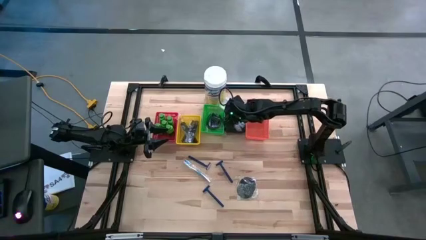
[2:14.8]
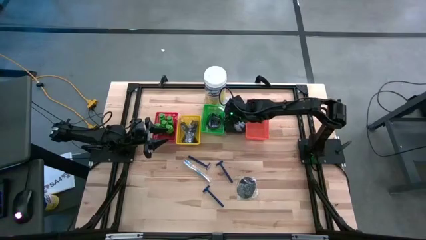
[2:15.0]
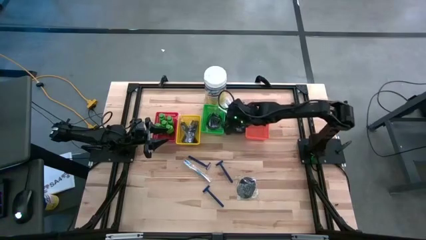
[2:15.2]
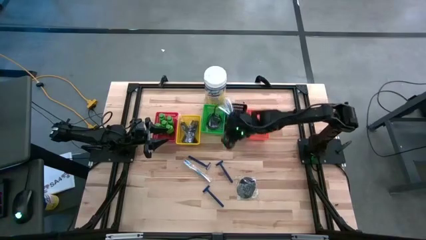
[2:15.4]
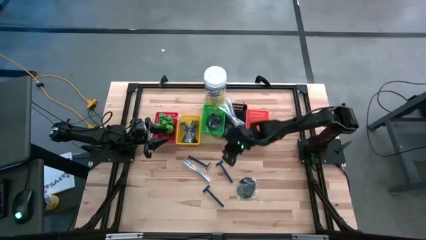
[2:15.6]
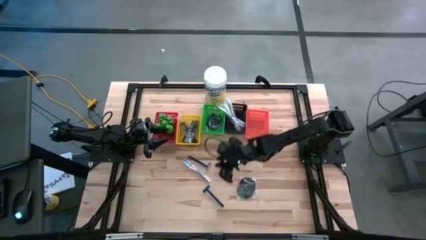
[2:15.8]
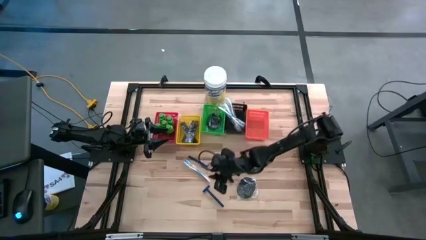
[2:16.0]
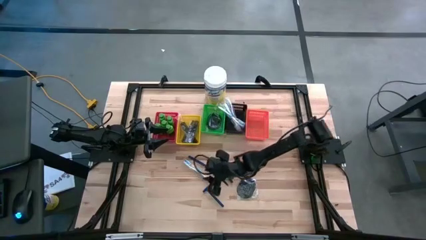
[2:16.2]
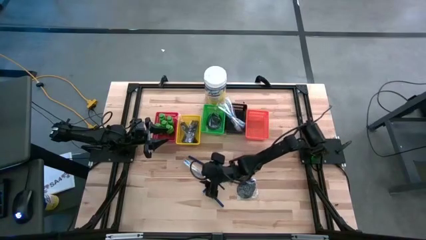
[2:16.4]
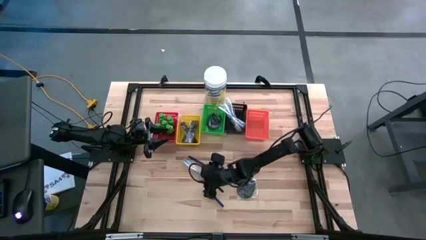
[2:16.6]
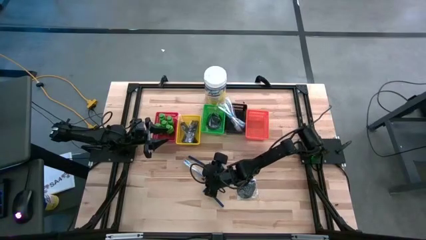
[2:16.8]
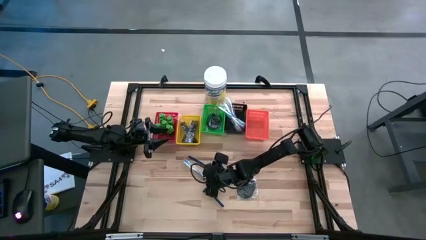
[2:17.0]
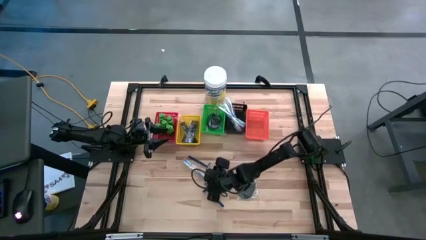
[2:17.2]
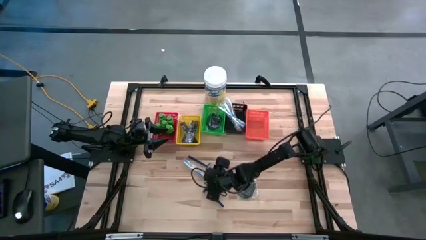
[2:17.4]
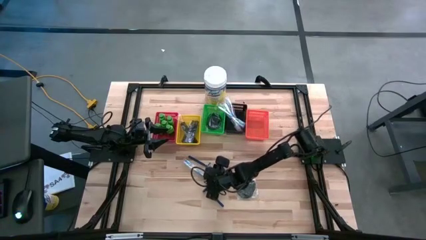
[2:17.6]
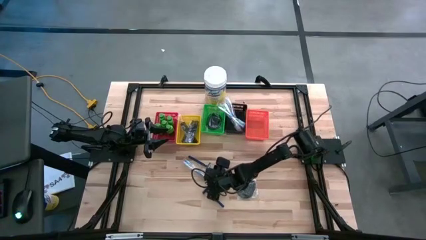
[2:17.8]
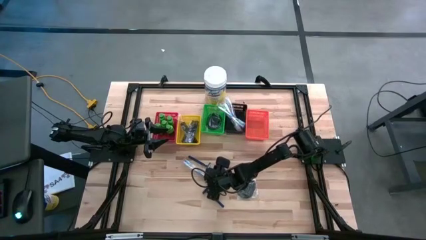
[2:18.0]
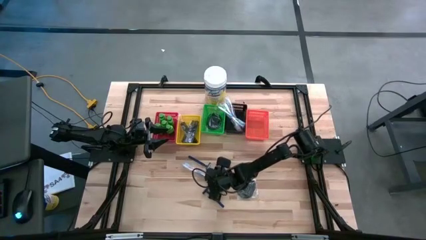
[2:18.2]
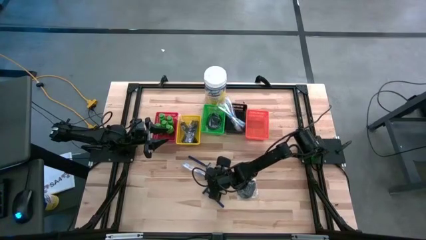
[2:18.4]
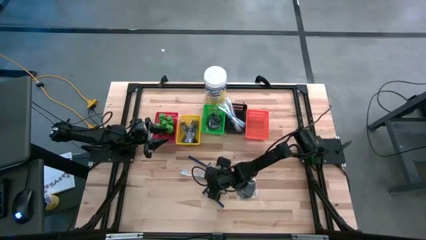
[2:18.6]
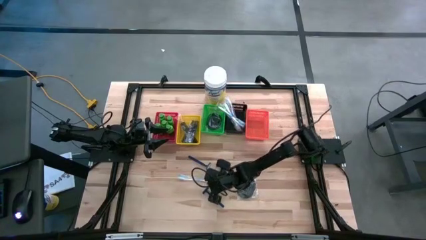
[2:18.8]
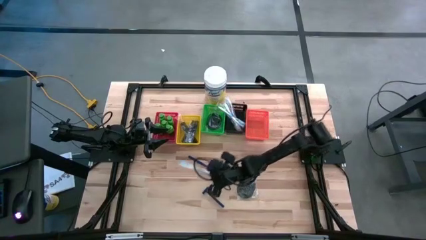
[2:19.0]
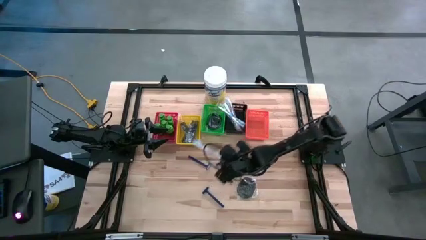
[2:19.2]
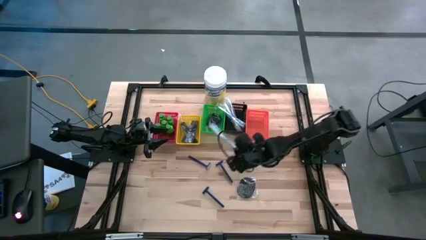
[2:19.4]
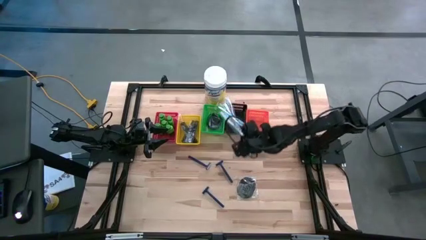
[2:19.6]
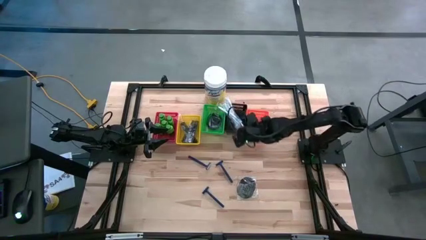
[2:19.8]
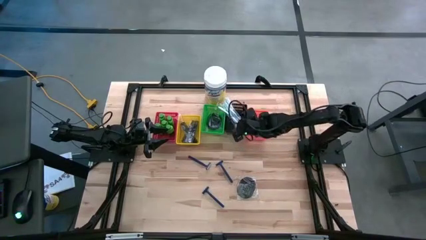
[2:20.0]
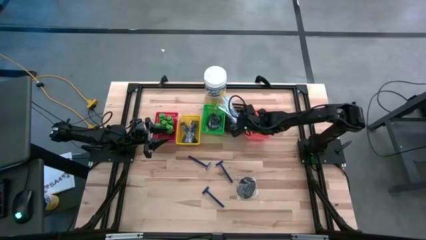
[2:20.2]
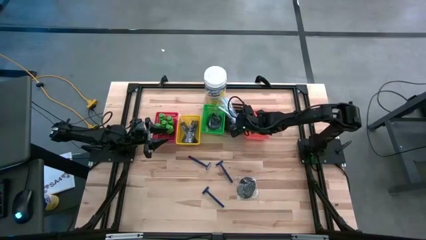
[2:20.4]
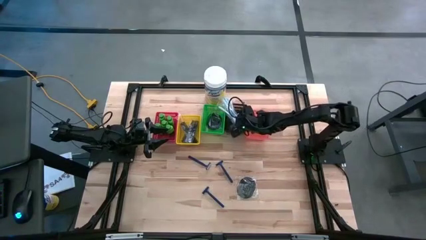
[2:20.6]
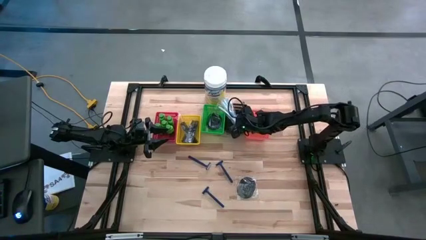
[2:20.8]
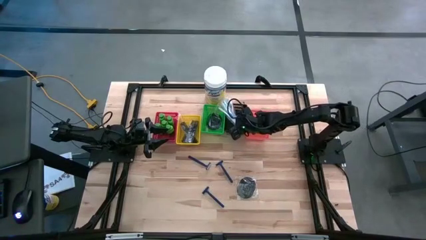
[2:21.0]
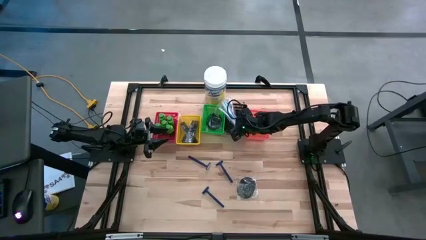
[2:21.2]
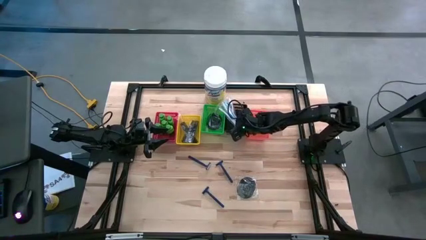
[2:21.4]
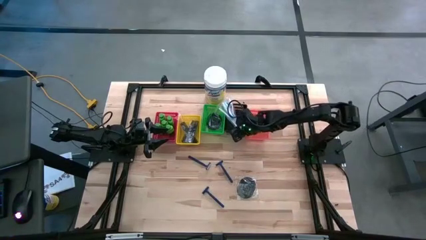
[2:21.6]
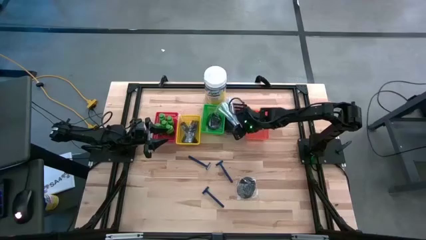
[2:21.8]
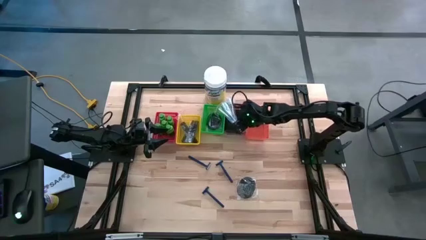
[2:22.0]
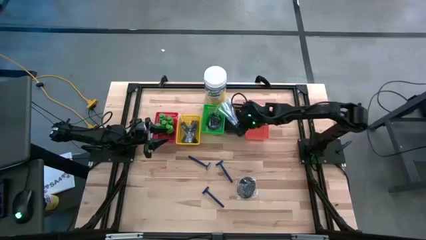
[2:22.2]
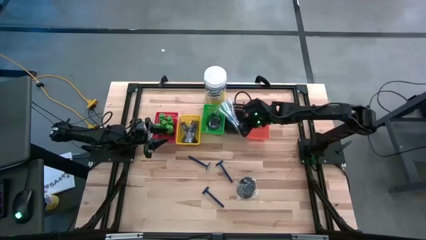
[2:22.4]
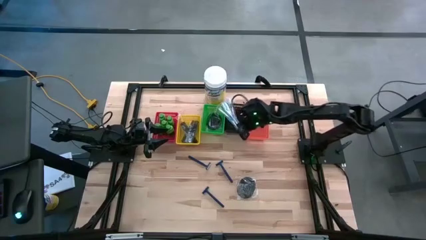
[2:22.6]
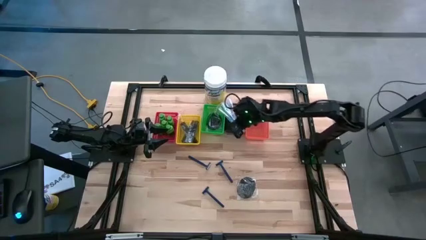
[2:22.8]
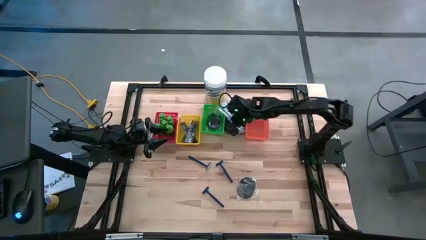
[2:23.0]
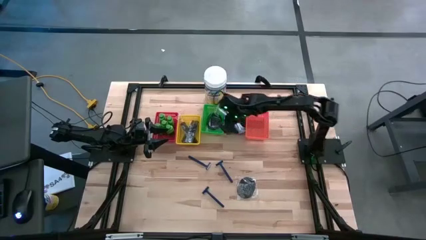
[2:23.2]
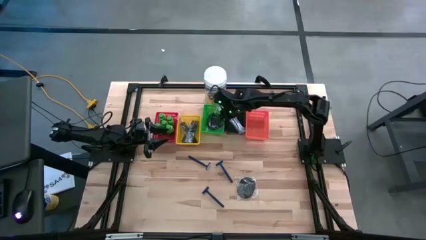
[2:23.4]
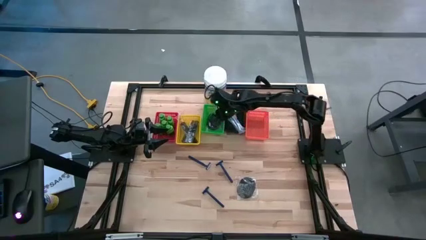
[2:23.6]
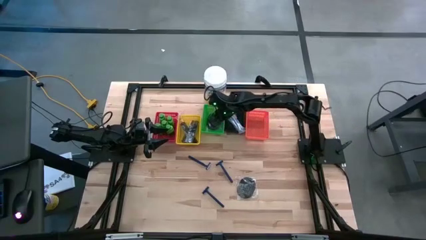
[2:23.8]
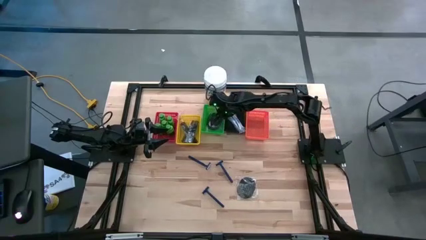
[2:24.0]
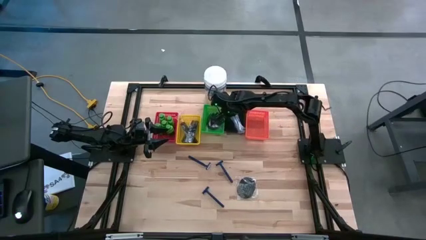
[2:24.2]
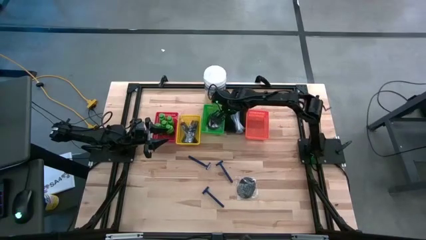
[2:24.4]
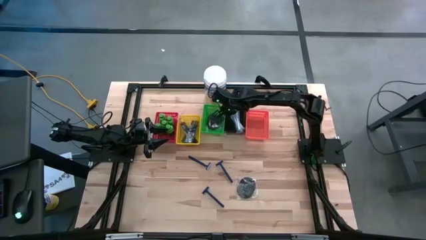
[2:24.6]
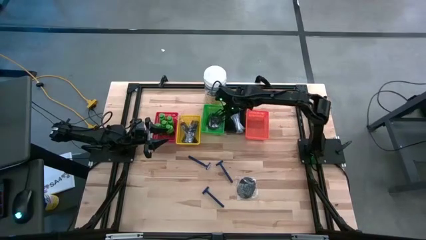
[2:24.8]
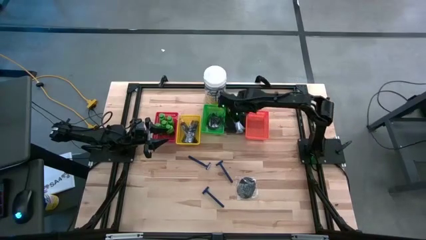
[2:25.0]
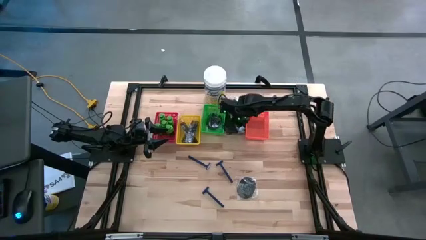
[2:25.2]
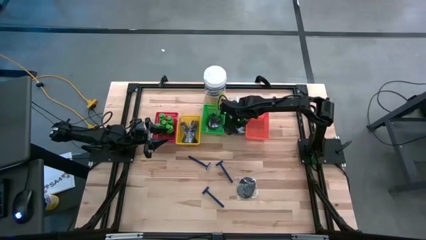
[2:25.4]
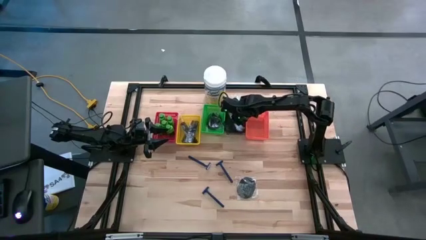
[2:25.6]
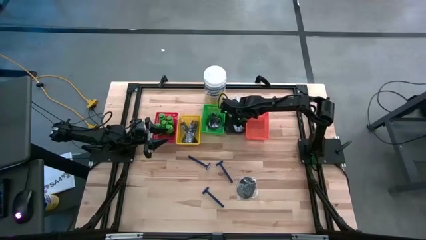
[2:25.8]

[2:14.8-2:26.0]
Task: Pick & Place Travel size toiletries
Put the blue toothbrush into the black bin

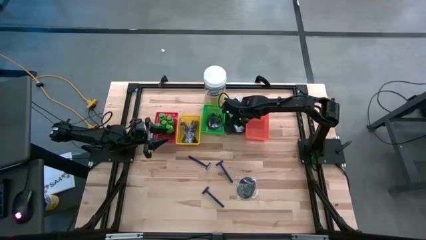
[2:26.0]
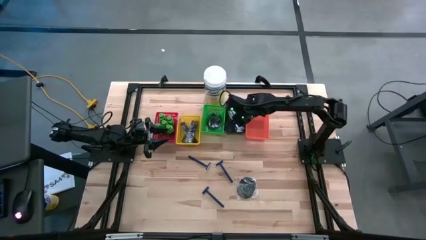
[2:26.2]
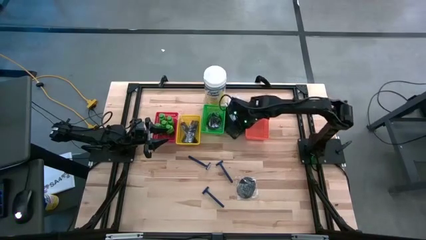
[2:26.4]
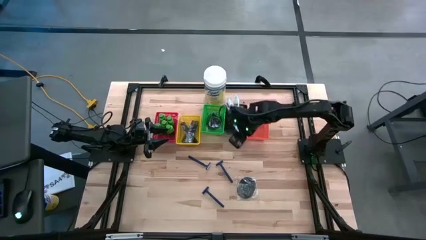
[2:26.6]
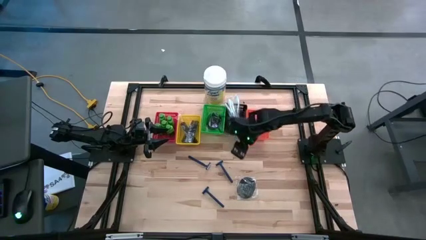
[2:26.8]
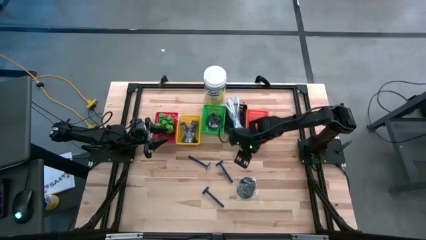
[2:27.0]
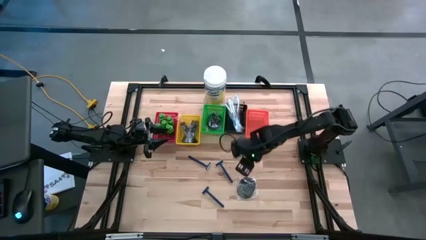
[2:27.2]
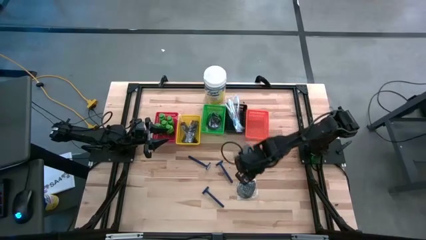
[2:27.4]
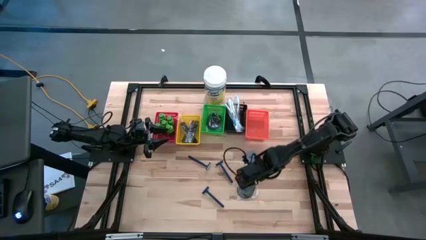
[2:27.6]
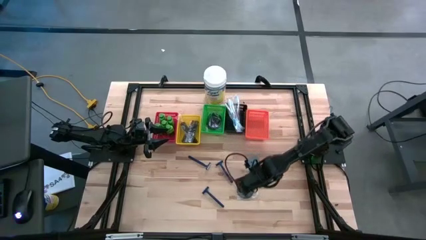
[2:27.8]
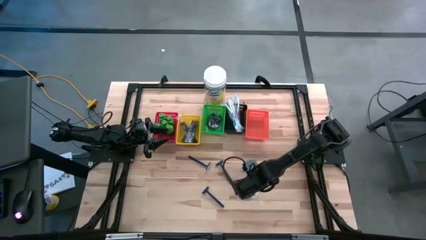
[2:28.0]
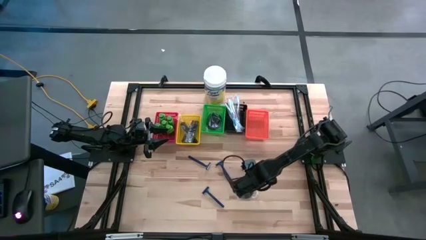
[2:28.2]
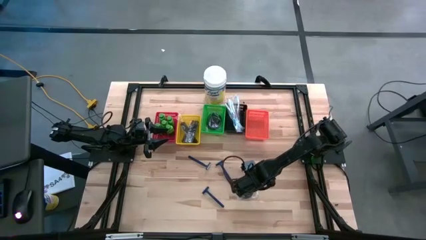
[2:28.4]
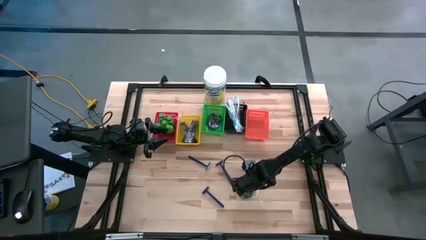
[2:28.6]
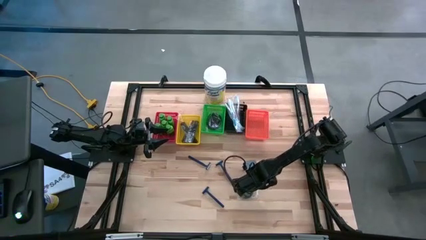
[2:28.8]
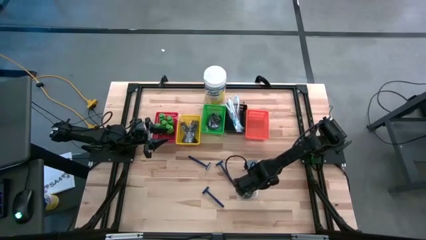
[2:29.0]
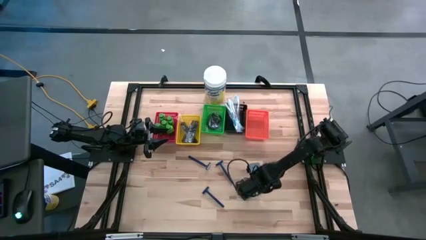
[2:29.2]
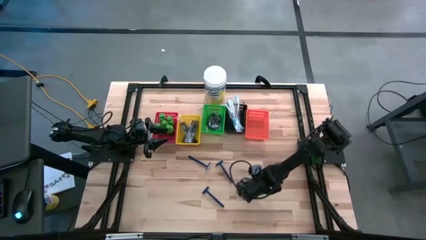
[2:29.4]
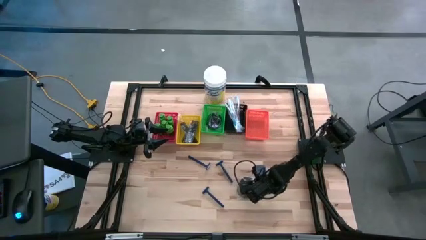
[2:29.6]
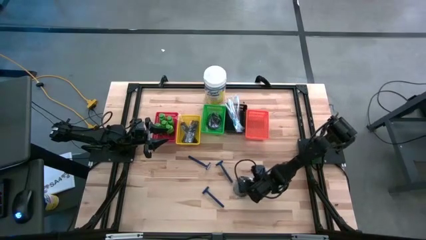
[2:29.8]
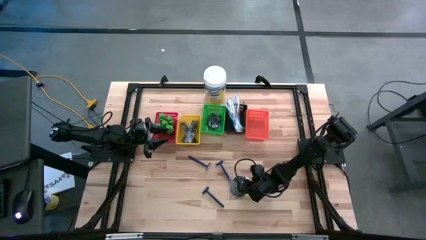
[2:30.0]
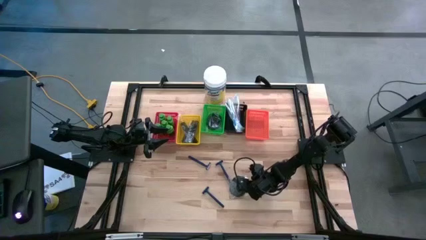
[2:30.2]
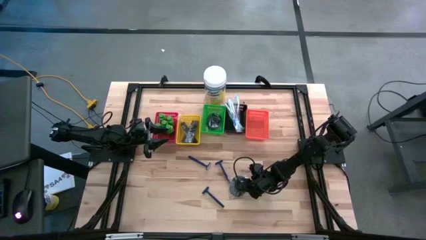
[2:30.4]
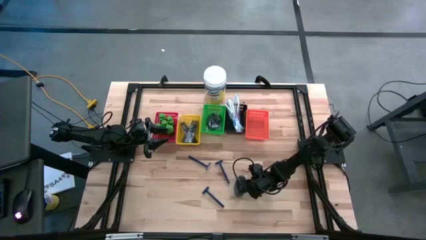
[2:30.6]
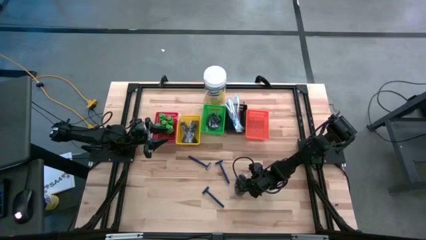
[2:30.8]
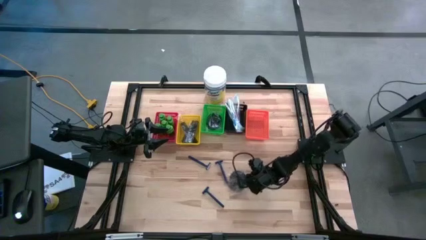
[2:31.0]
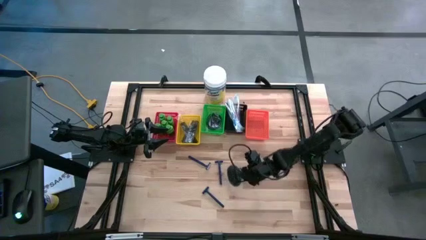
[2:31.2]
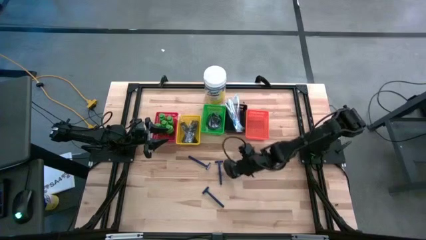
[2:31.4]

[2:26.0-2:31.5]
Put the black hairbrush into the green bin
